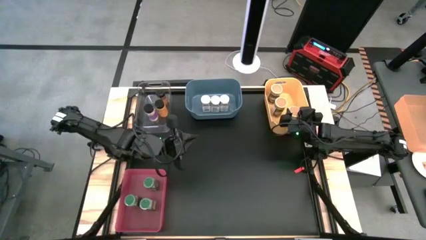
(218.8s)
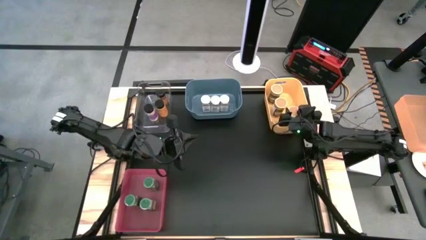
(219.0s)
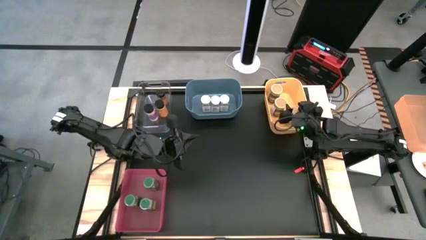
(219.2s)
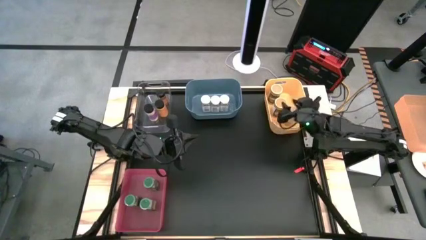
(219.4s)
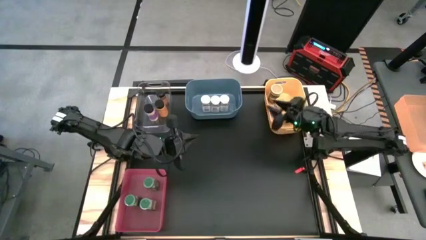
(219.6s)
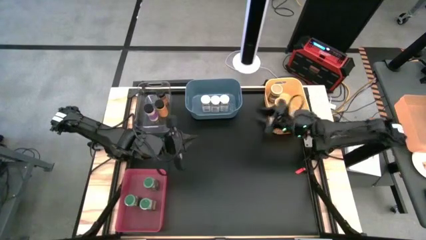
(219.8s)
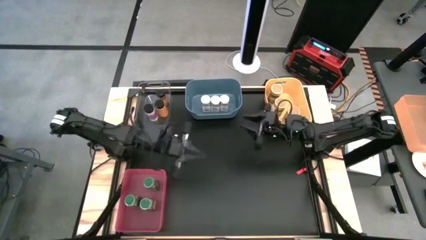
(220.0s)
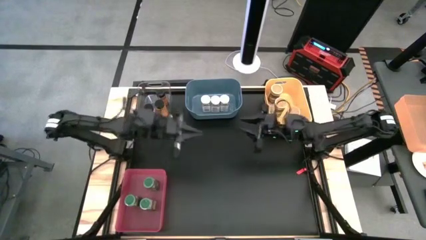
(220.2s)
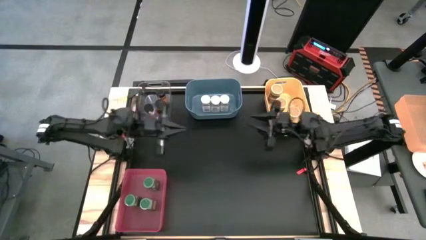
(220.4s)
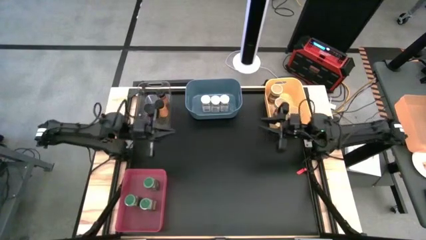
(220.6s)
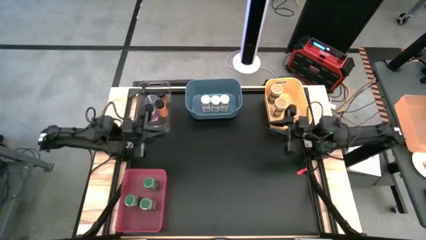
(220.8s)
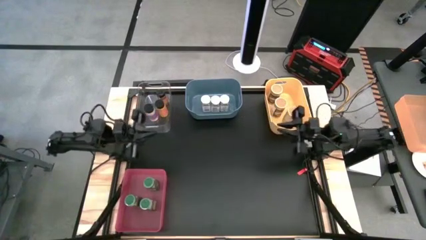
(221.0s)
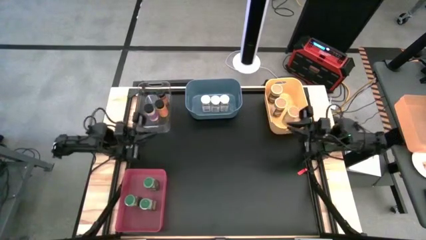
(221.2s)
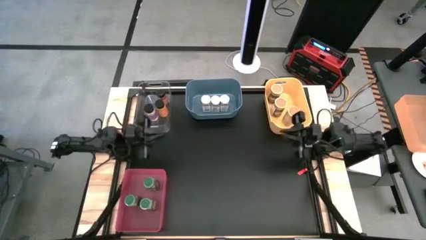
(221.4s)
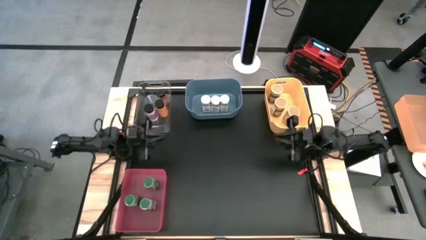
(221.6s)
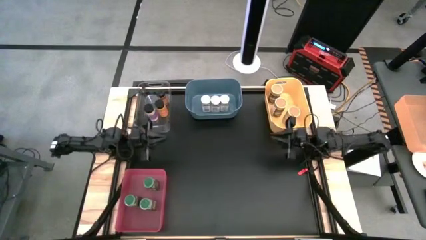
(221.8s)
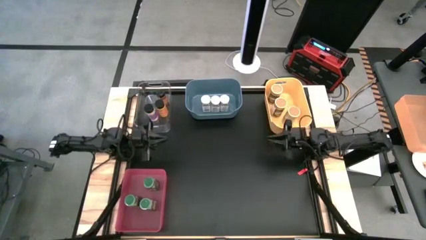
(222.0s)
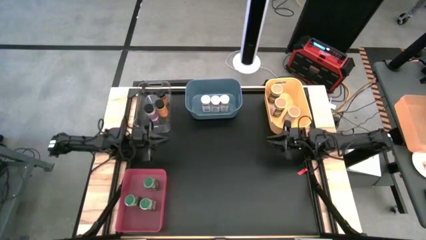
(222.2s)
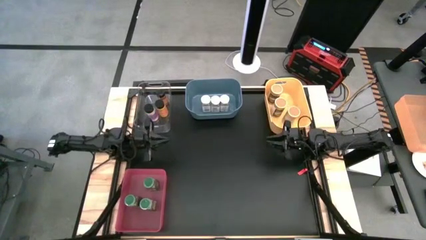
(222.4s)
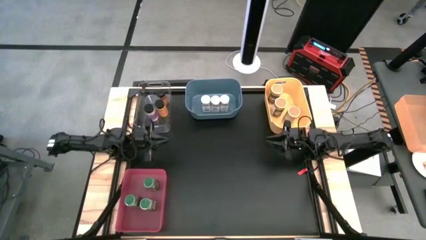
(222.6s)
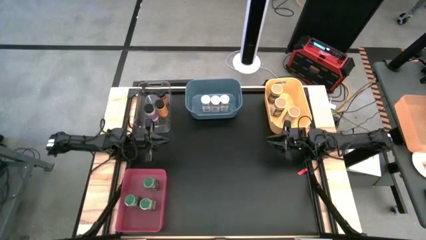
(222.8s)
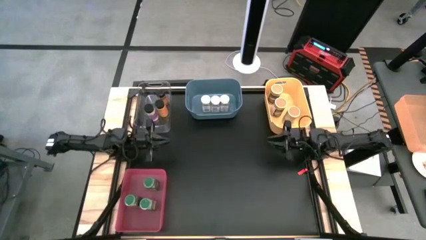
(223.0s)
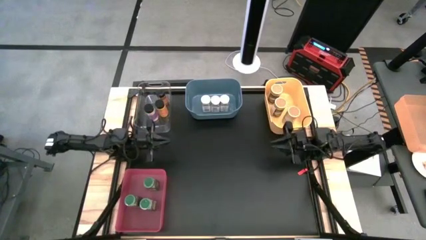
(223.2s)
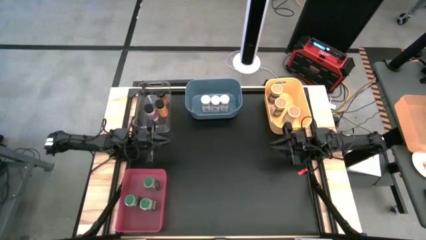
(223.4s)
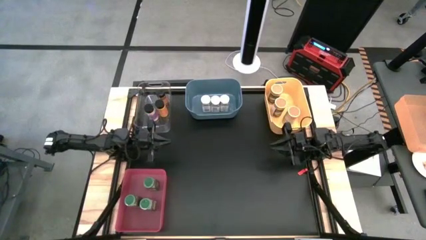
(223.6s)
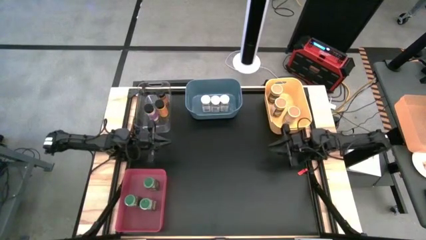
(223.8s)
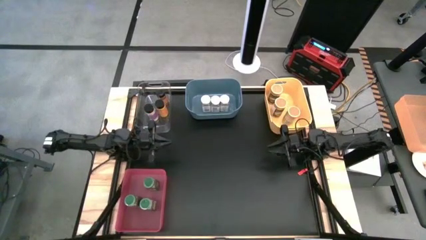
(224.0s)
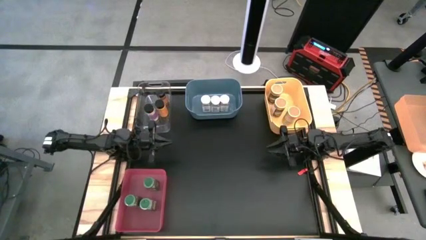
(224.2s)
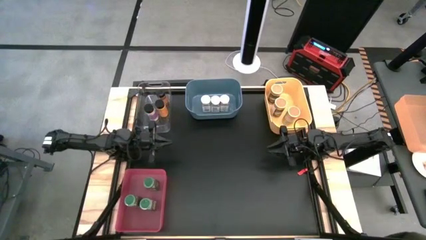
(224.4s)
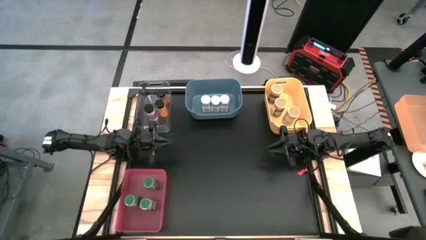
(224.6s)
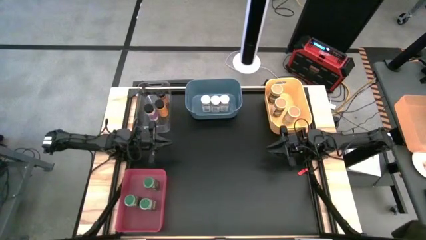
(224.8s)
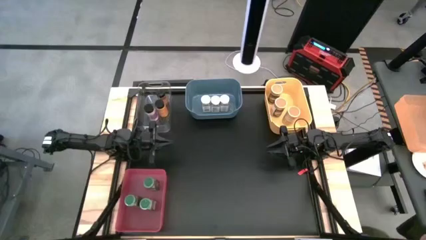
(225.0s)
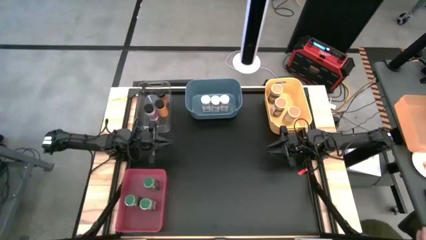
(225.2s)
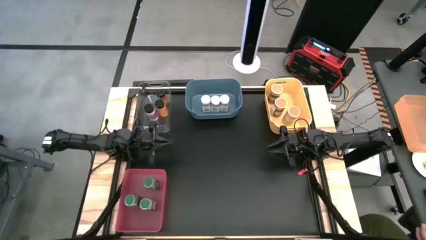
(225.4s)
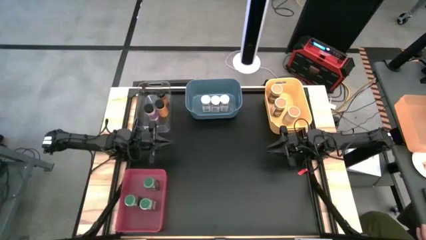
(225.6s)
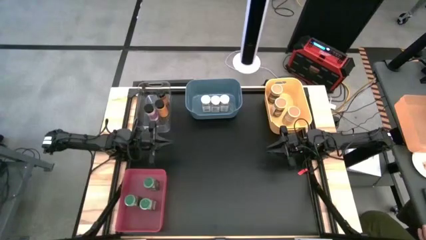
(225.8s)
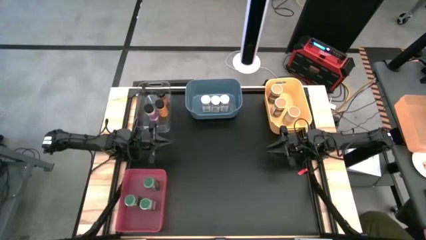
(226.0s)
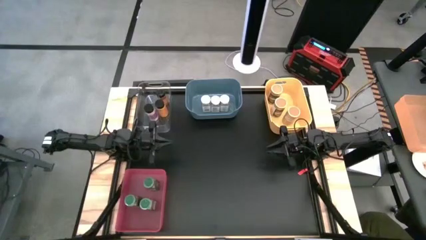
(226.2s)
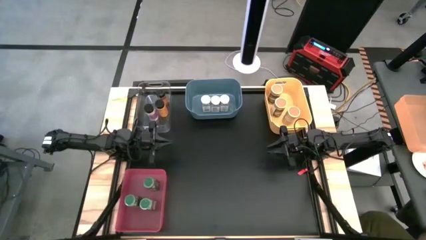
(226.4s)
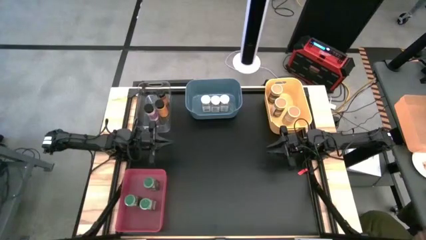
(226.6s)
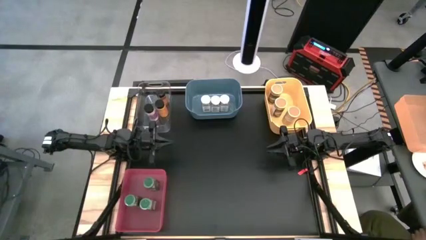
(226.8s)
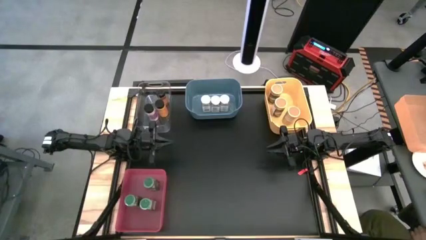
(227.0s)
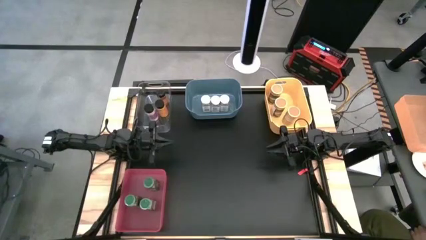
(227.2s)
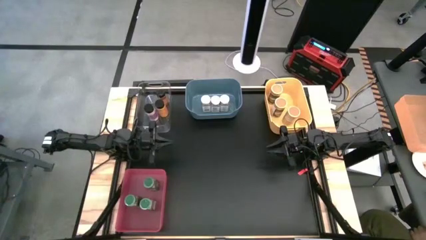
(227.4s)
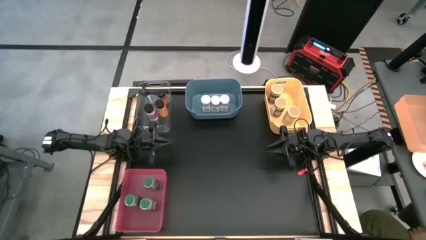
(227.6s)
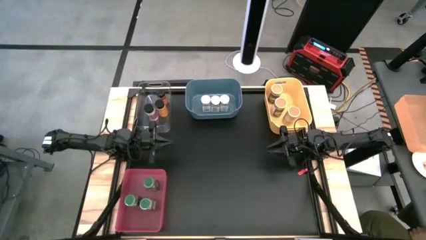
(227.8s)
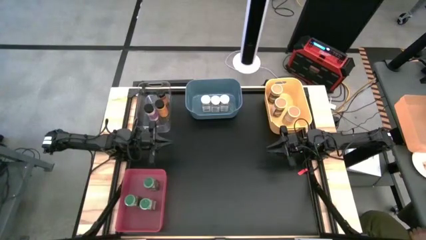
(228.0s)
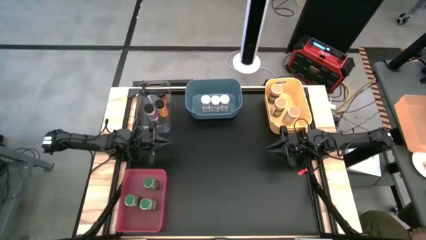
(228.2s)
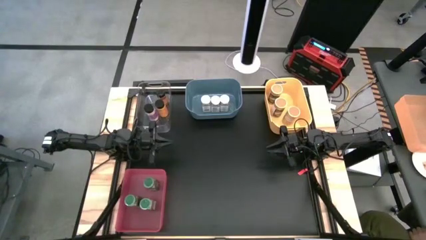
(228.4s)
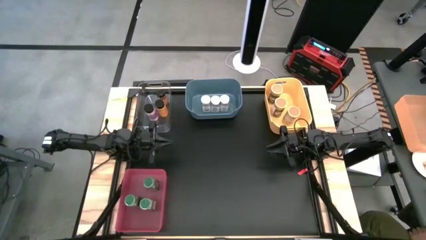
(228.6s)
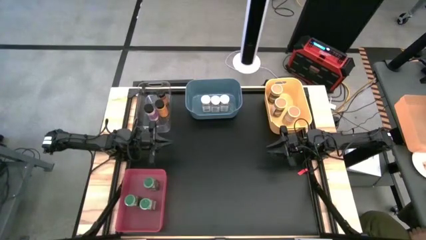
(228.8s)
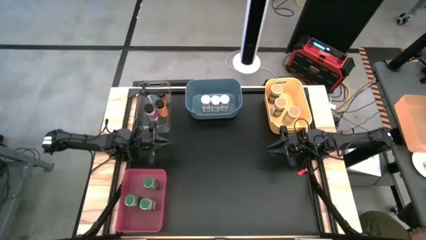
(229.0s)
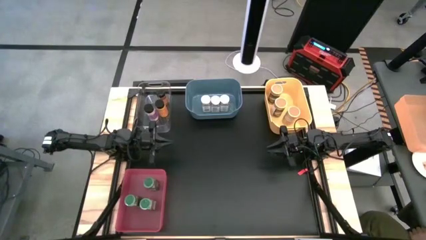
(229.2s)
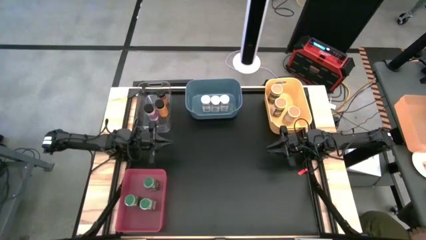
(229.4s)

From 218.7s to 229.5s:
Task: Sort spices by type
Return to Home Position

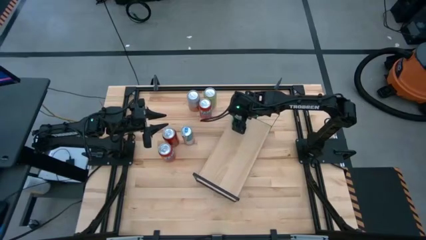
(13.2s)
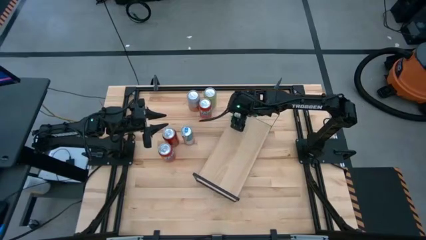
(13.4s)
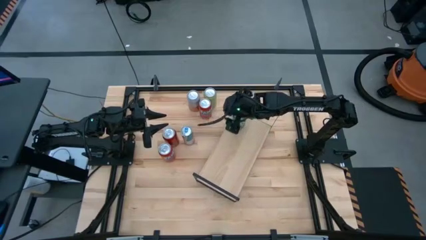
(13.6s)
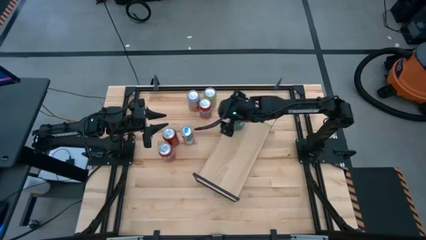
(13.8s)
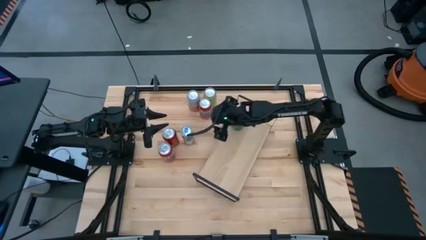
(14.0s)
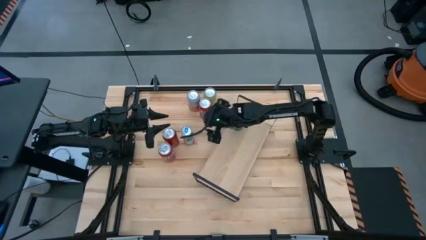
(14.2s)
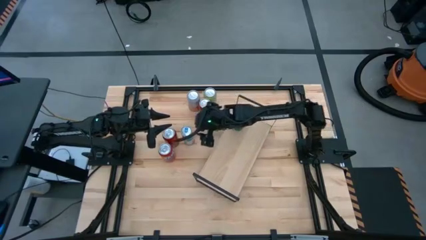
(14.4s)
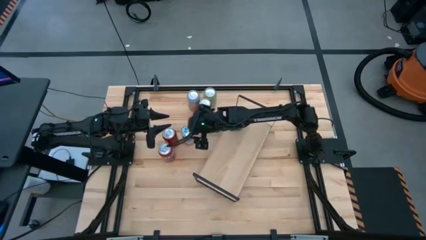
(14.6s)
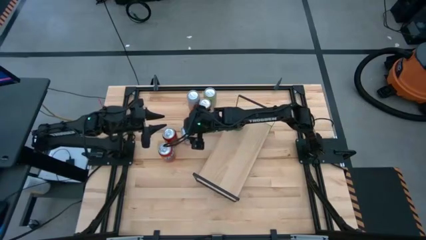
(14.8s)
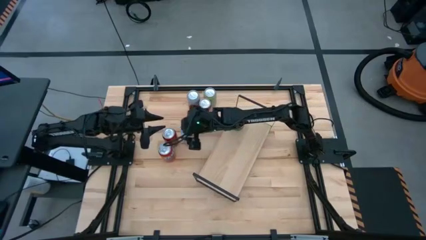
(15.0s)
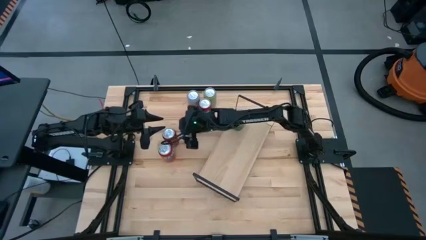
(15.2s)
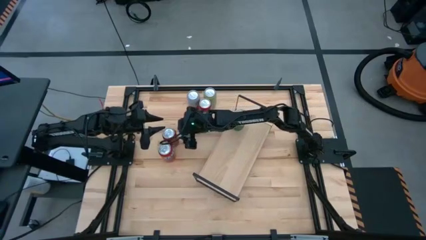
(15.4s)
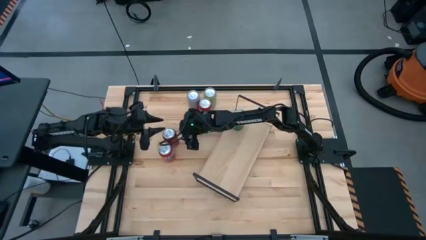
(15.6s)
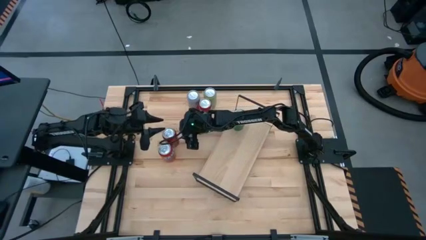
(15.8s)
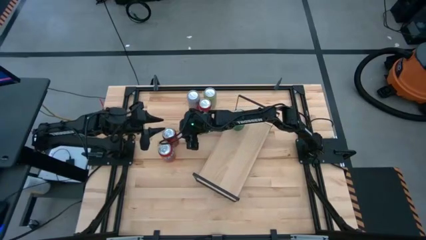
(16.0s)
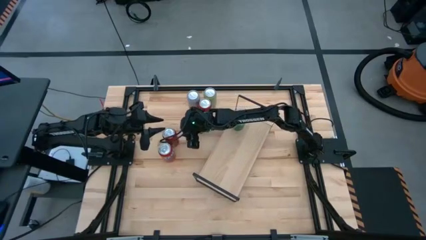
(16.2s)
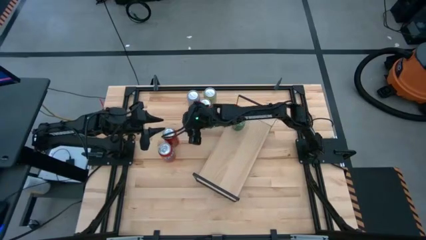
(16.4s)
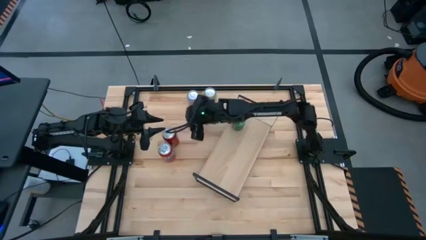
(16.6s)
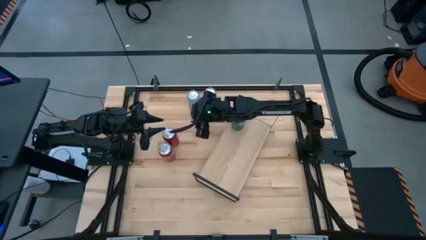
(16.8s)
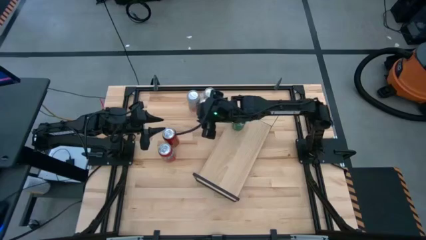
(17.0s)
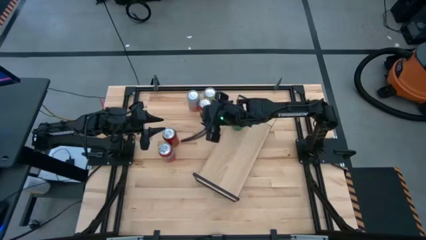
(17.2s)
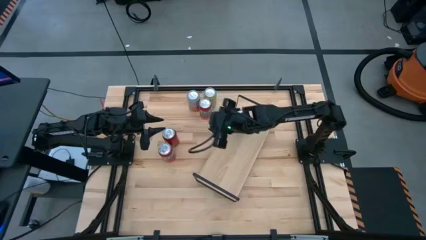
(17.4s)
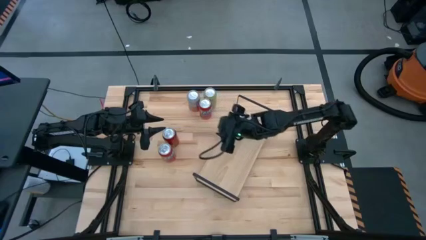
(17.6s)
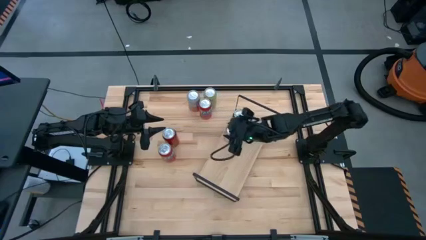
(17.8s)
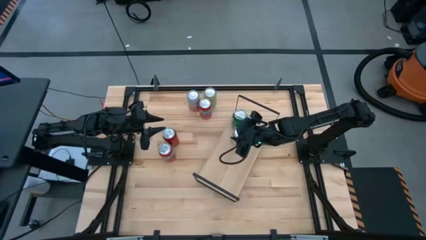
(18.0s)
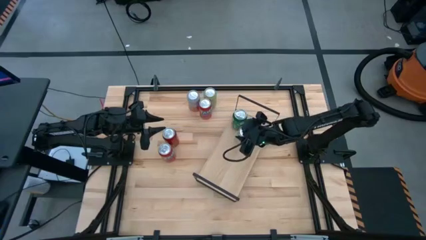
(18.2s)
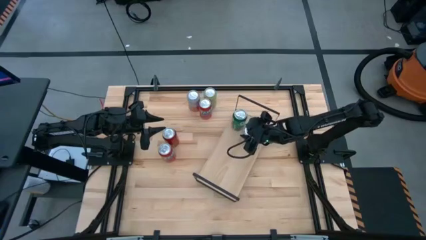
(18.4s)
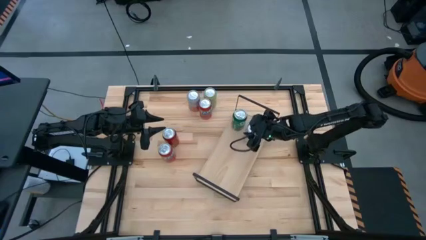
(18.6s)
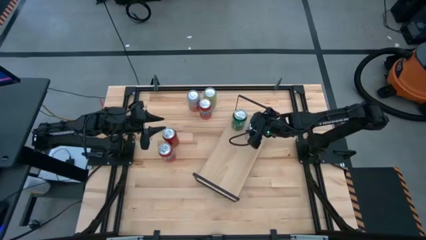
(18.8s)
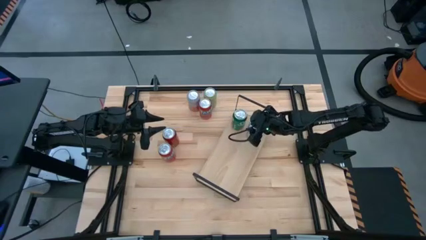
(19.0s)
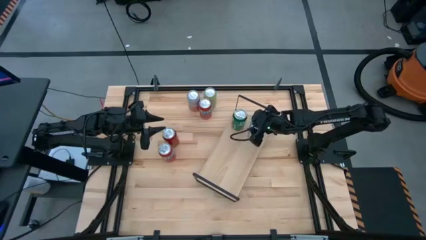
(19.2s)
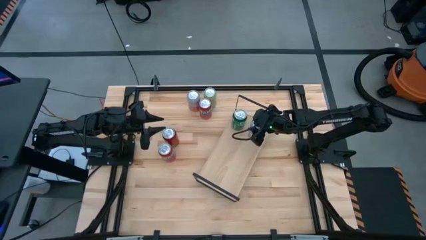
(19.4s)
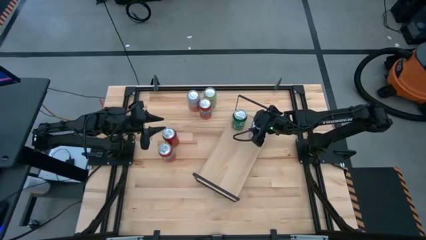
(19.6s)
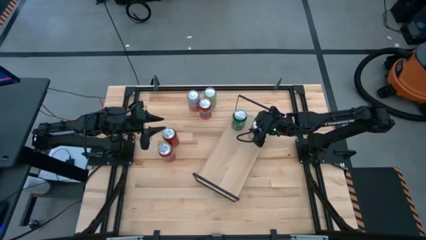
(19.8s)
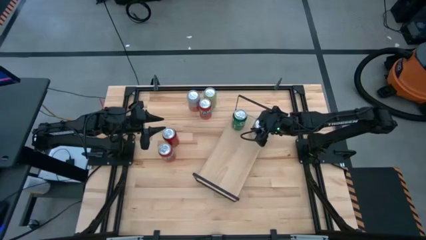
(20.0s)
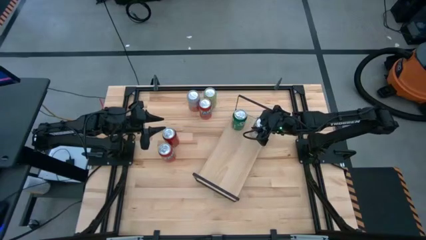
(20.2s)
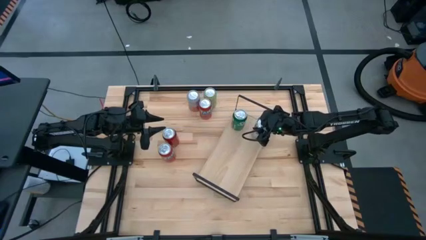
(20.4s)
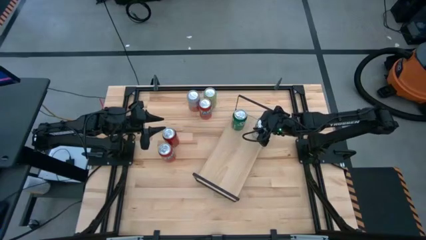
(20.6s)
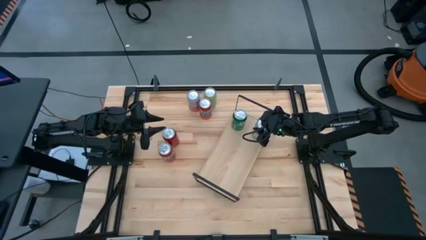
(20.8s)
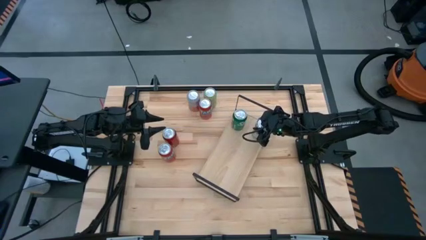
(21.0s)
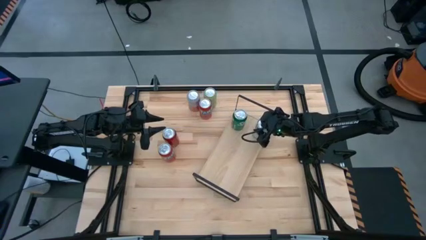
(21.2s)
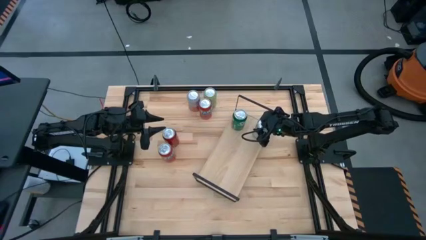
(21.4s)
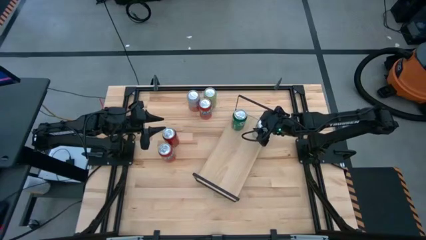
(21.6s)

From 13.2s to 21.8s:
Task: Place canned beverage on shelf
Put the blue soda can on the shelf
